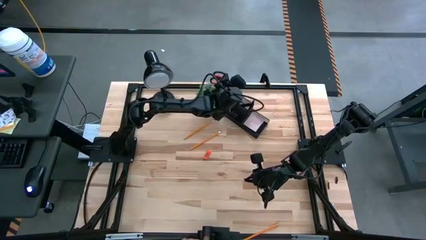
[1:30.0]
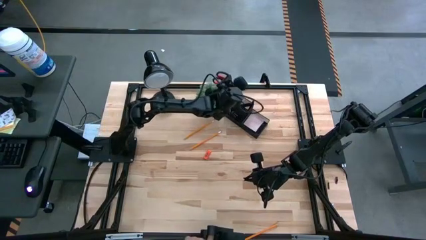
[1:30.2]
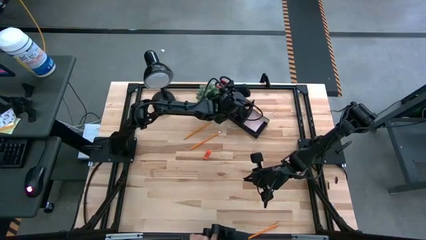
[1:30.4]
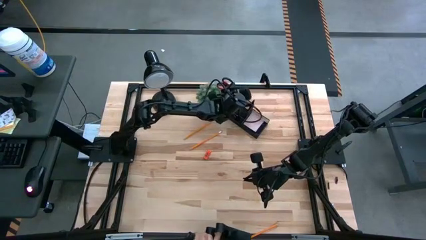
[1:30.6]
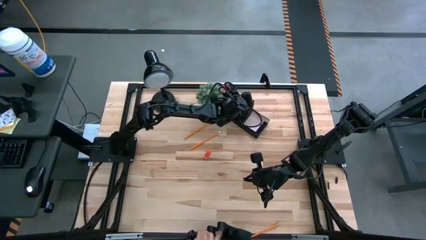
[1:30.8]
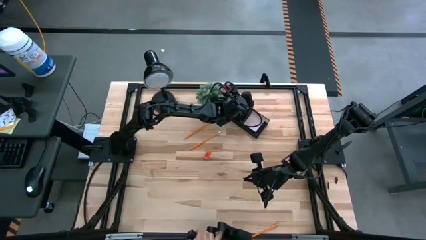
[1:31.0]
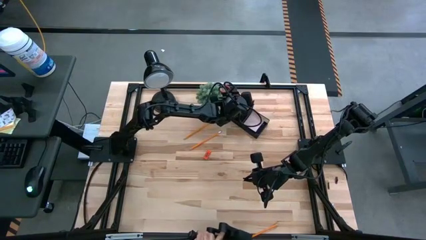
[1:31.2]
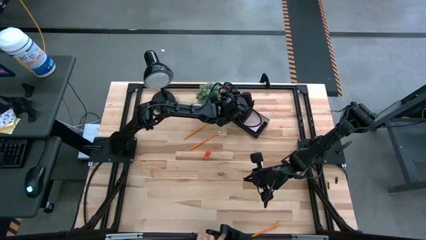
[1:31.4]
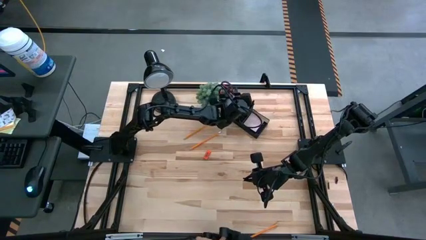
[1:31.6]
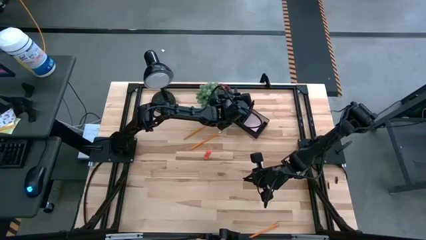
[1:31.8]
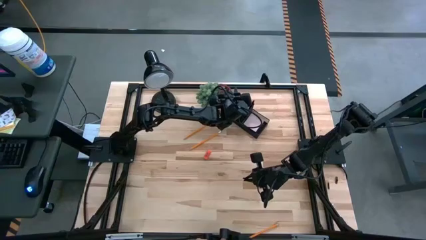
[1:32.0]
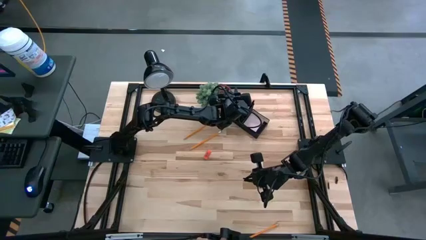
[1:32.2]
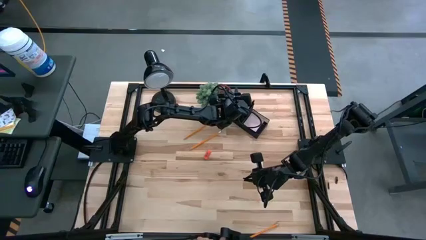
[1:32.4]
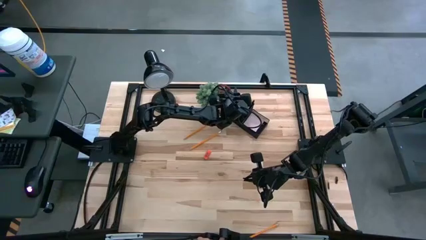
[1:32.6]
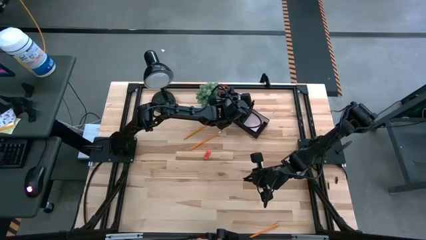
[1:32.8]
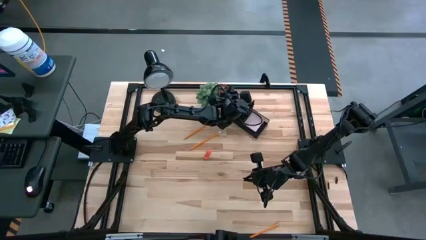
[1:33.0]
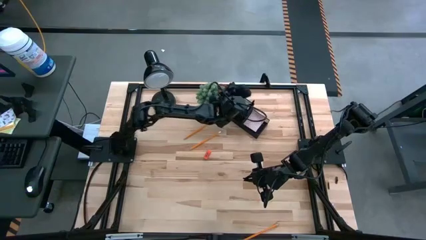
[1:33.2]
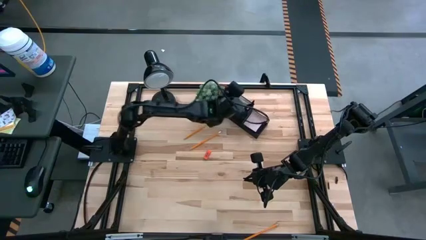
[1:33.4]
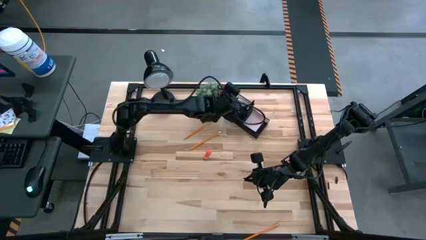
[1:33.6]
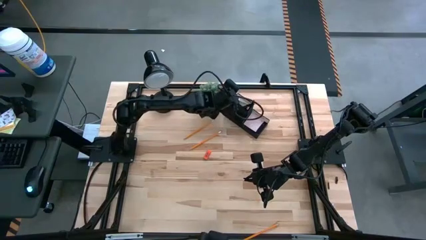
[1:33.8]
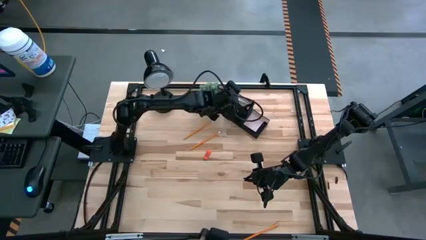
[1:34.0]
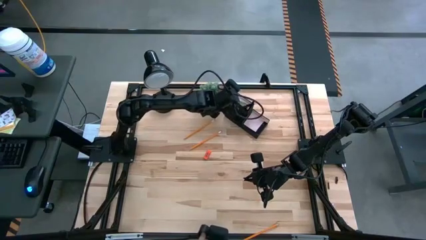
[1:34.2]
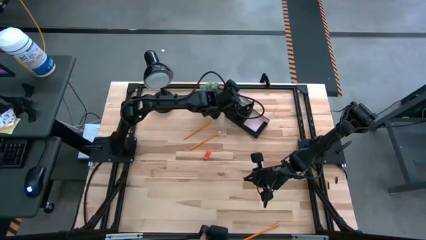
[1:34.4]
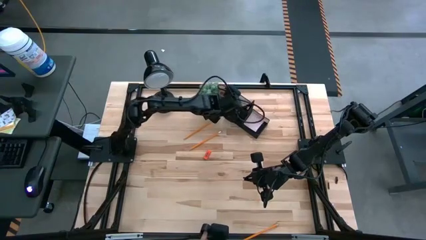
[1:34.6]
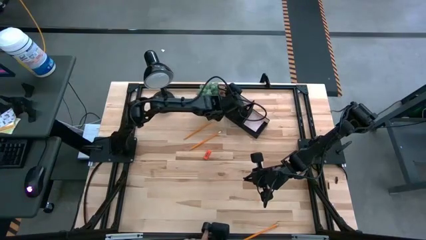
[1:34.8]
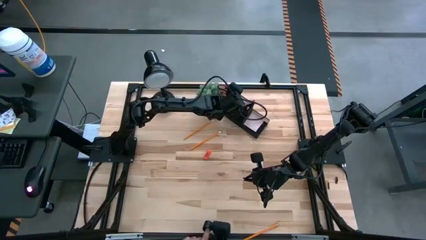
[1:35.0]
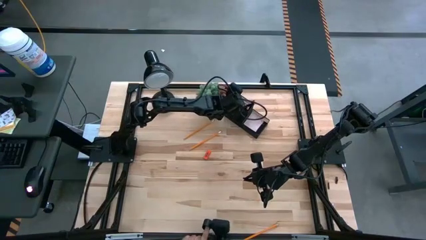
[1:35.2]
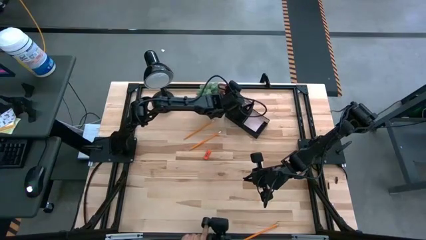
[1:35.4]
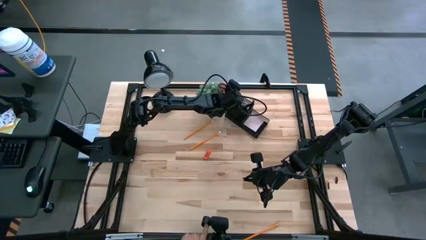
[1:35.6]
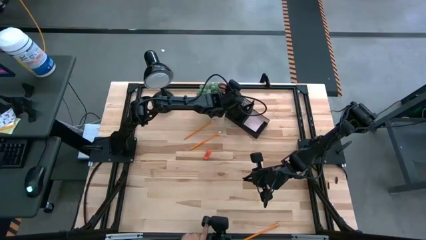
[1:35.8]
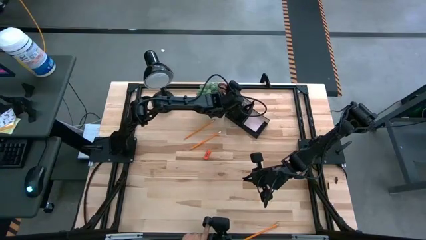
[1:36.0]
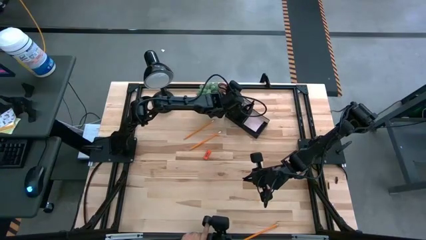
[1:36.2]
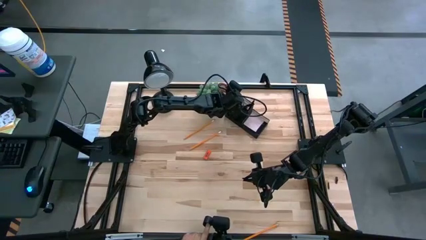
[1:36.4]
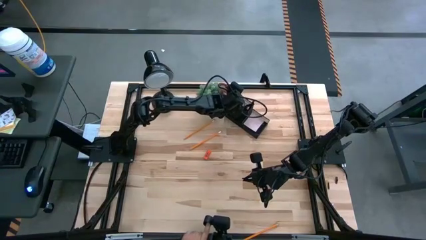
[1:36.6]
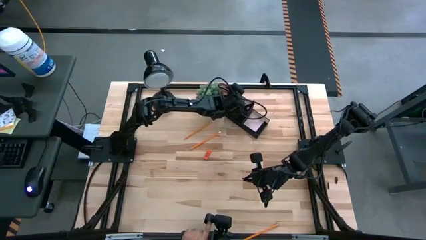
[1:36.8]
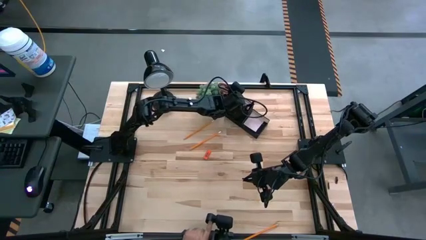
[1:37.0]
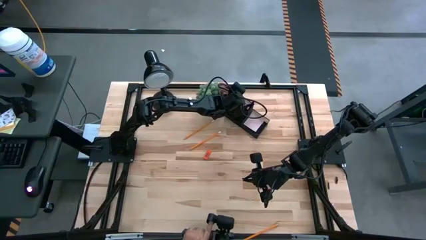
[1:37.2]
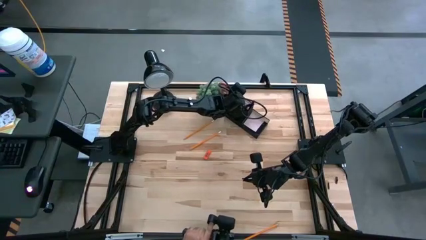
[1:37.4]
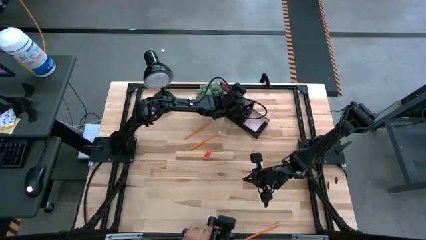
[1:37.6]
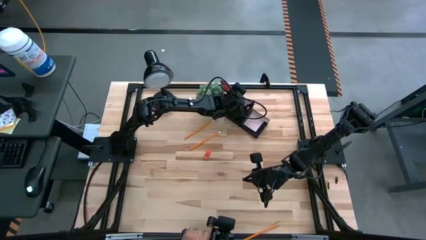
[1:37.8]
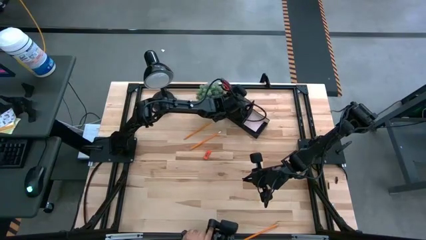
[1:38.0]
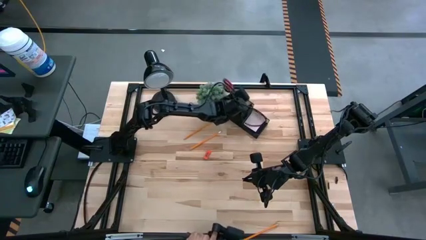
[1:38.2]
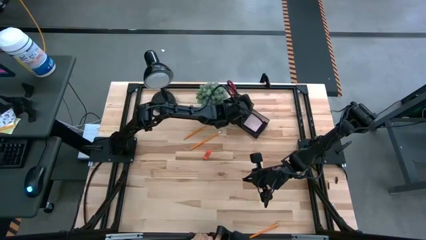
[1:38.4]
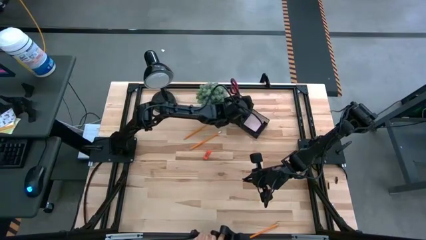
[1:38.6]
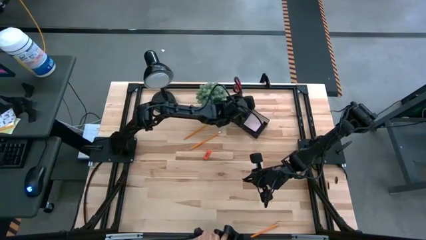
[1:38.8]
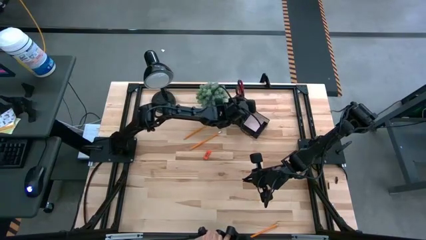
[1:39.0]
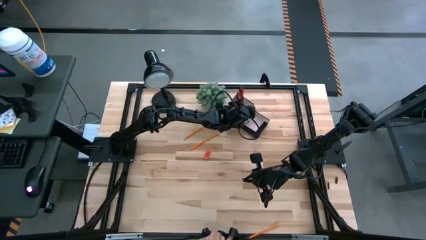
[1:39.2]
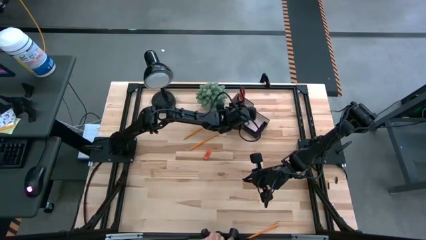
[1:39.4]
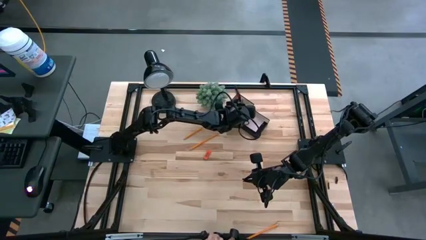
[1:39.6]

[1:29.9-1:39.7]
Task: Pick and place office supplies into organizer
Put the black scissors into the black desk organizer

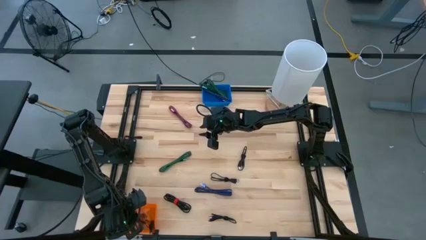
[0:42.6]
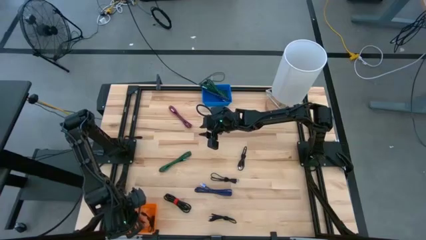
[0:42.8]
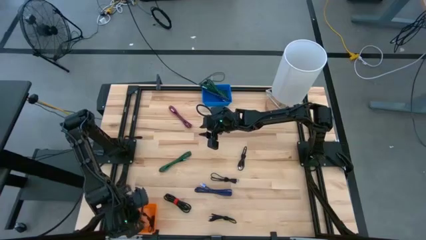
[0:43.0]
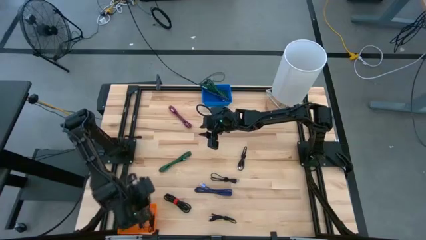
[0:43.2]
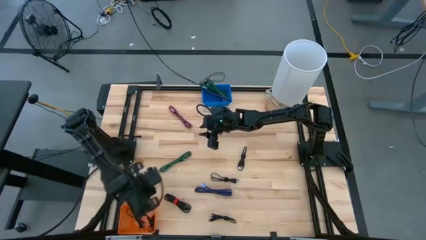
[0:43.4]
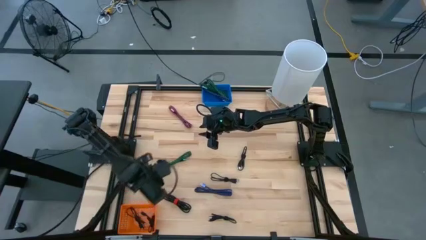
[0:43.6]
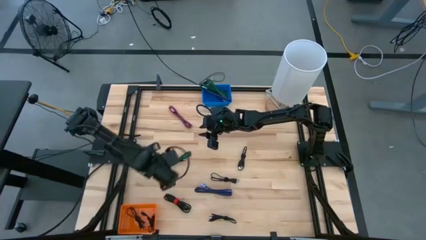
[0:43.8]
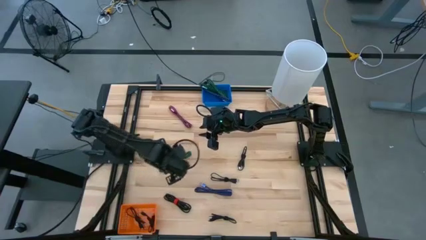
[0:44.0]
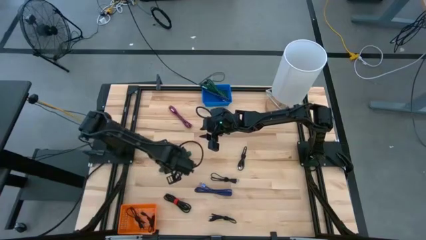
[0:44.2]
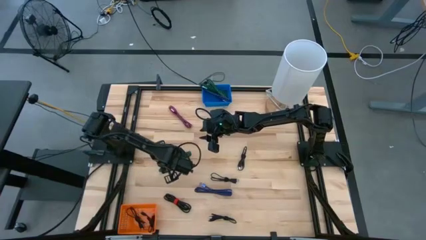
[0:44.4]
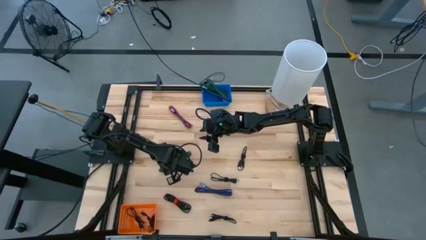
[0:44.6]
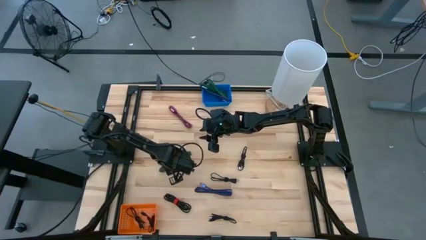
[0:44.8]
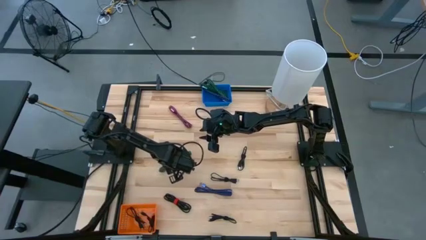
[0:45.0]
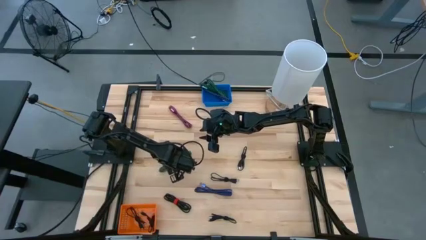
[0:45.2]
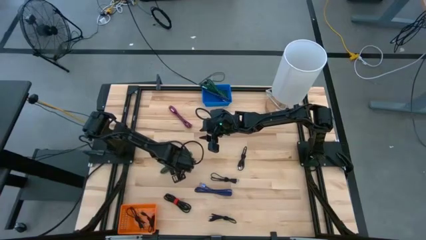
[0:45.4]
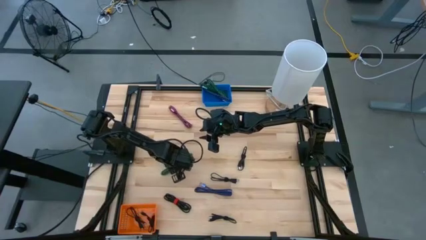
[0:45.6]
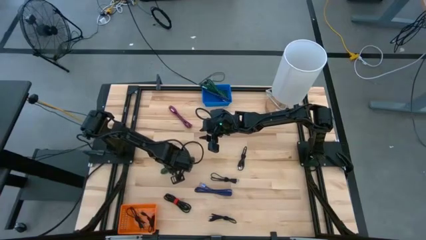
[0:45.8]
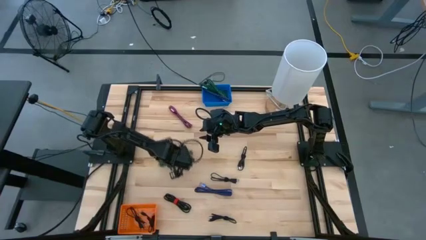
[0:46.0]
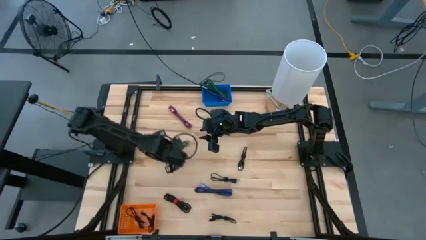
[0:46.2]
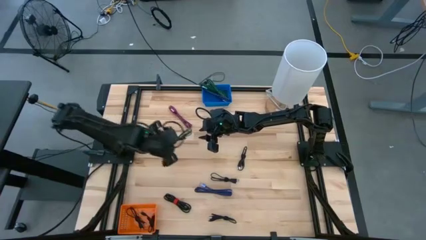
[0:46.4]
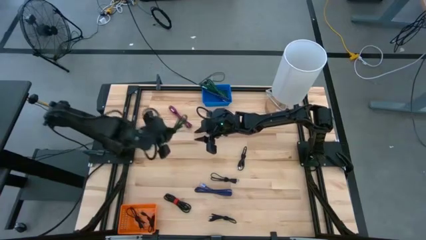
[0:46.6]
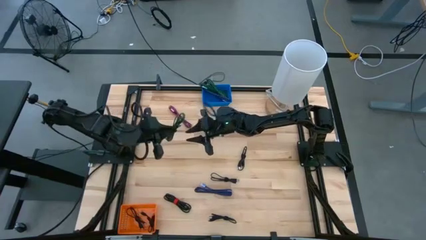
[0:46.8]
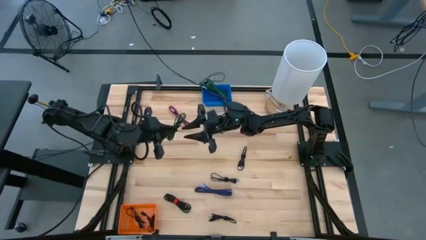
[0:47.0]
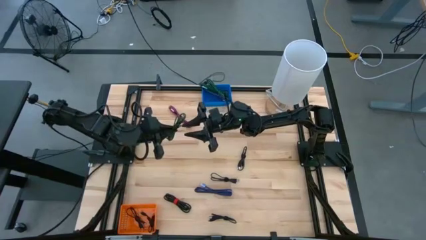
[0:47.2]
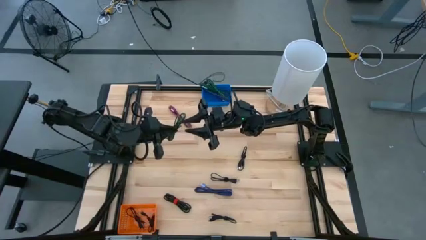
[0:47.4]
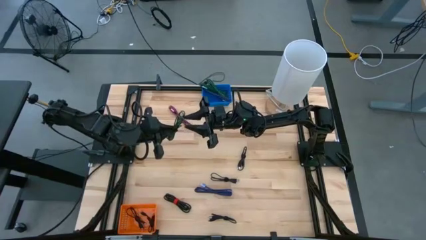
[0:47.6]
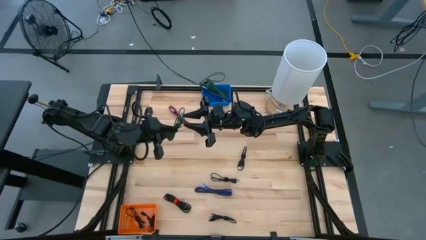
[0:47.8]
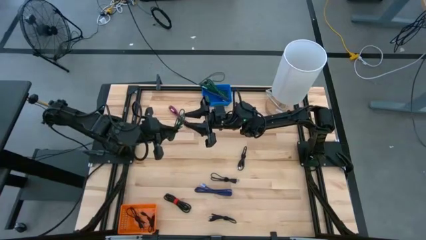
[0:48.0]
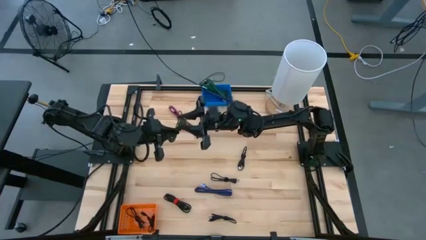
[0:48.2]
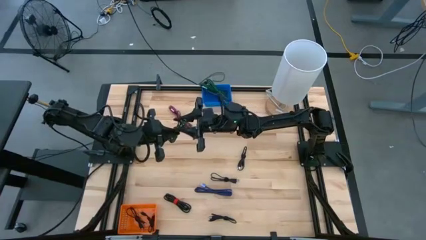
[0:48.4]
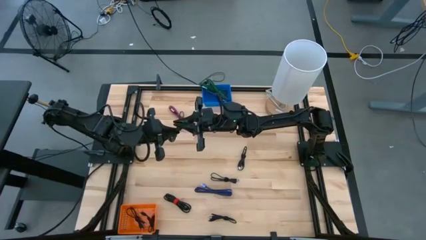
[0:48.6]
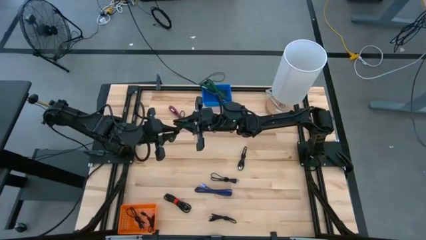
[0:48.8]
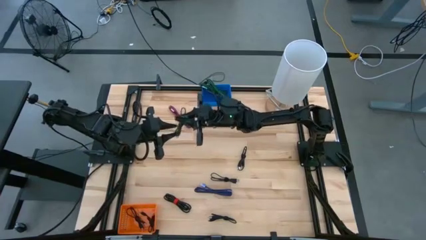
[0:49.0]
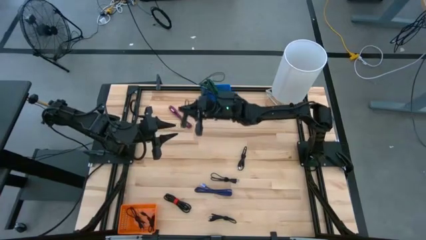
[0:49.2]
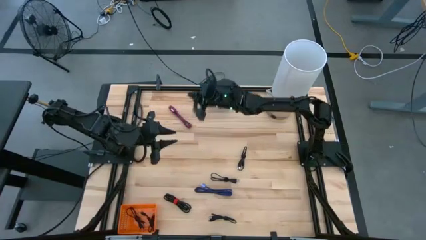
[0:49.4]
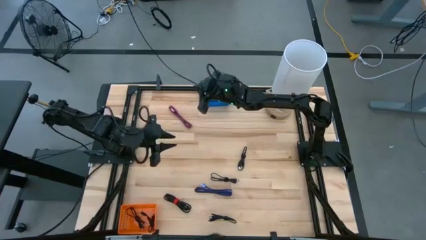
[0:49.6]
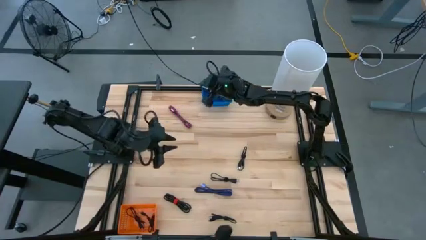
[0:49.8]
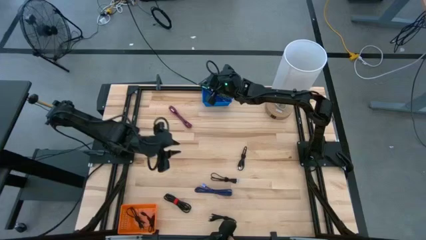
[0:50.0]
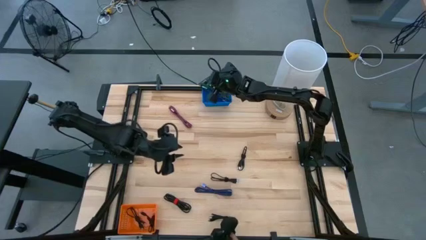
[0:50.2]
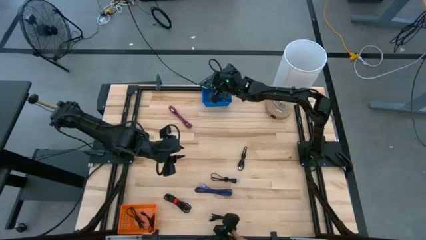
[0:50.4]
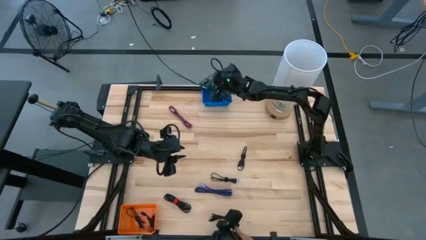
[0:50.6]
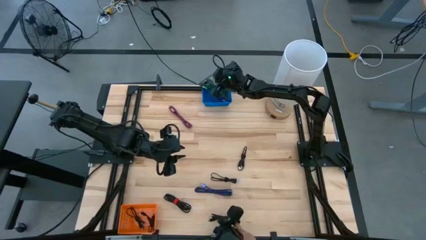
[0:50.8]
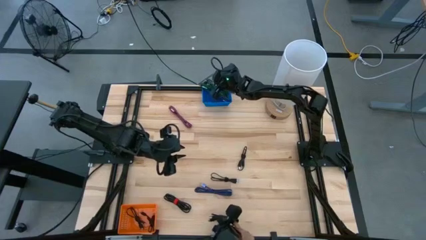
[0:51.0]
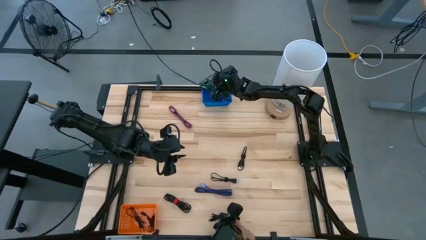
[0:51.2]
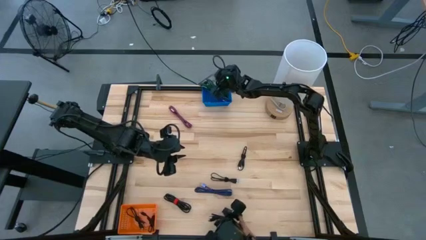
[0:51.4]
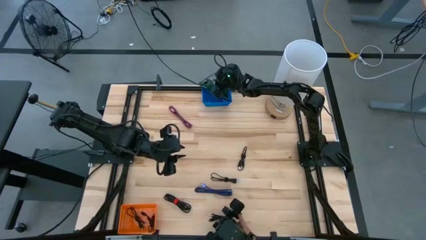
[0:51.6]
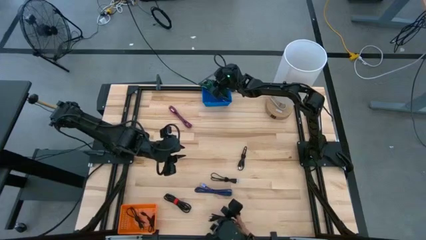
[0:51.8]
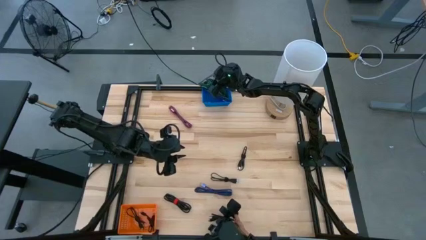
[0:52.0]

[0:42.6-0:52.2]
Task: Pick & Place USB Port
Put the green charger cable into the blue basket
